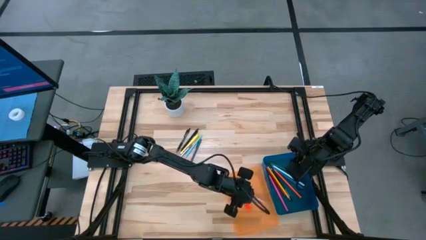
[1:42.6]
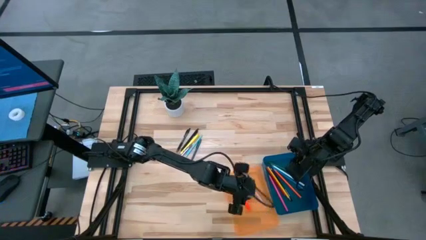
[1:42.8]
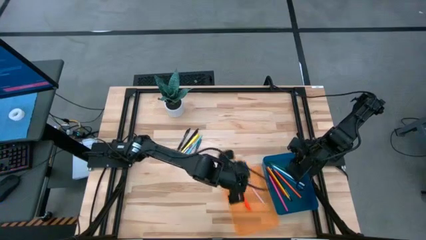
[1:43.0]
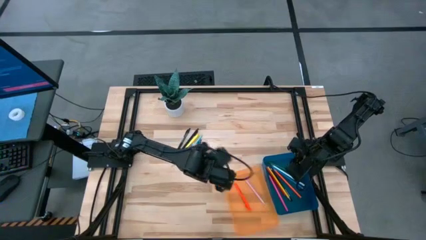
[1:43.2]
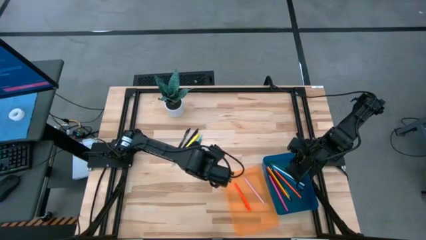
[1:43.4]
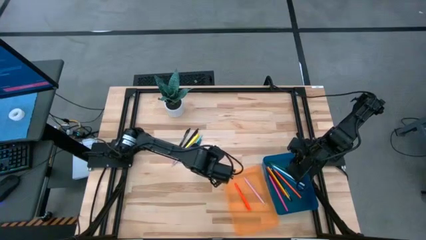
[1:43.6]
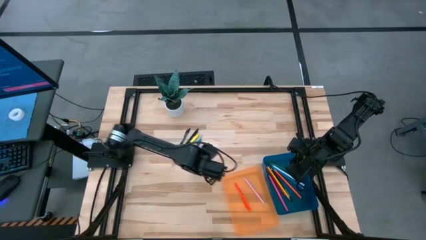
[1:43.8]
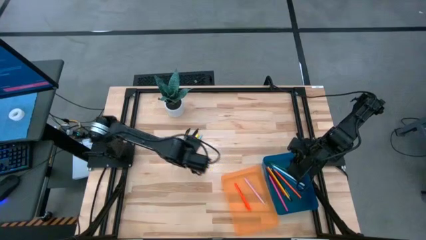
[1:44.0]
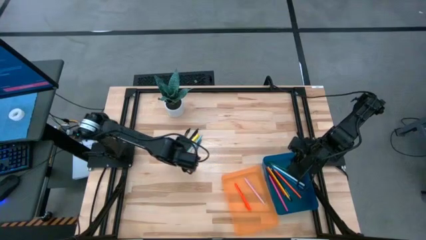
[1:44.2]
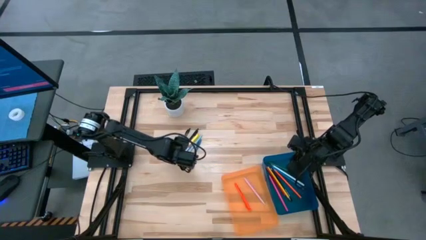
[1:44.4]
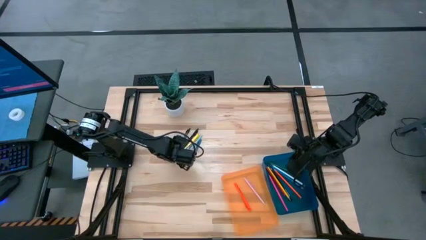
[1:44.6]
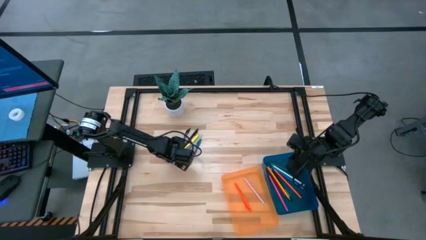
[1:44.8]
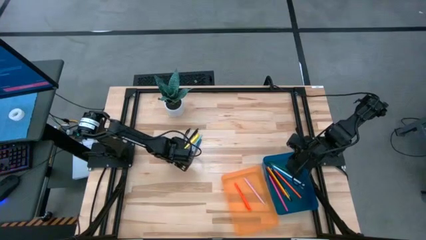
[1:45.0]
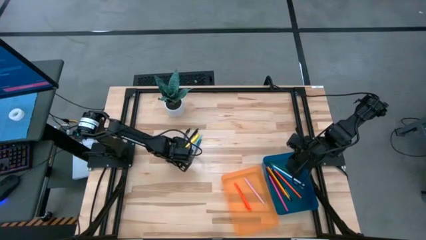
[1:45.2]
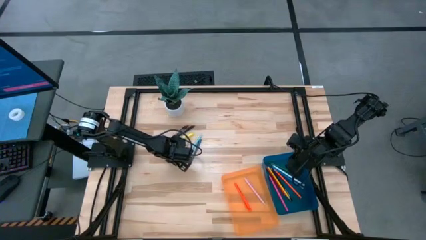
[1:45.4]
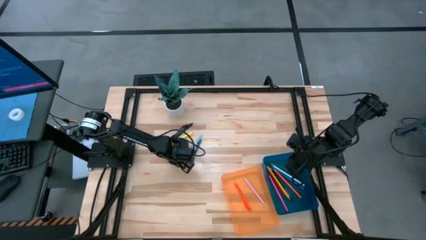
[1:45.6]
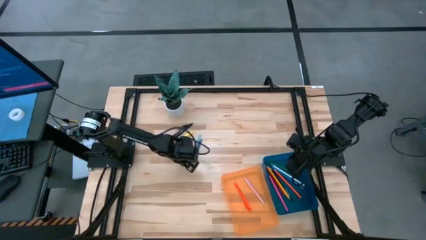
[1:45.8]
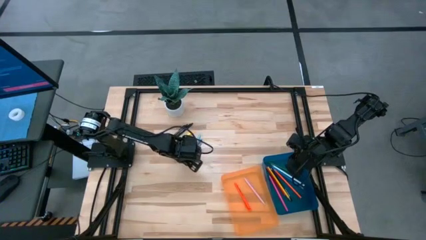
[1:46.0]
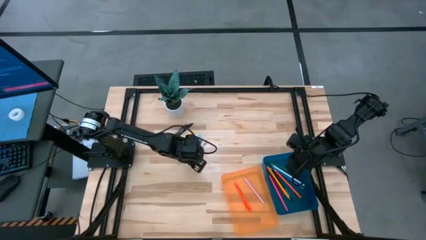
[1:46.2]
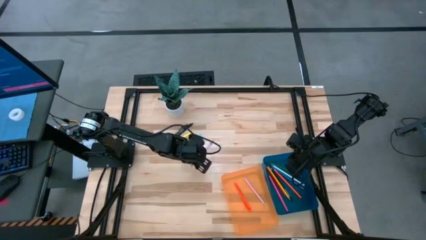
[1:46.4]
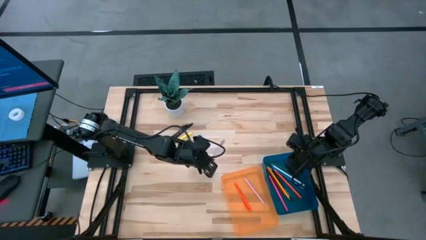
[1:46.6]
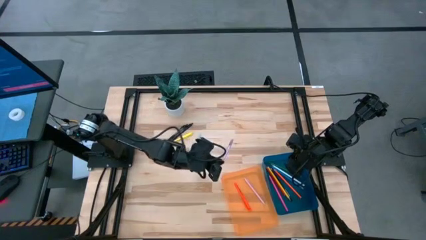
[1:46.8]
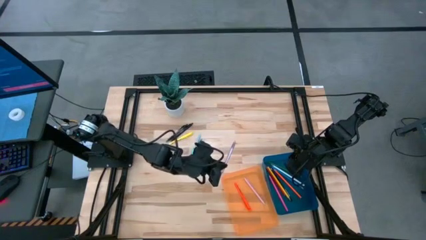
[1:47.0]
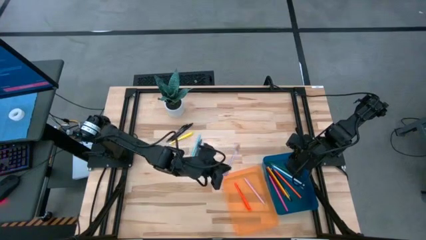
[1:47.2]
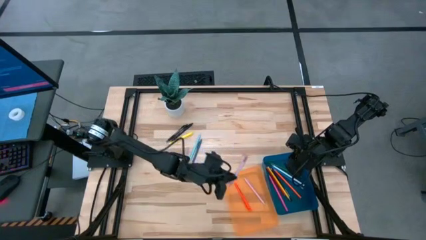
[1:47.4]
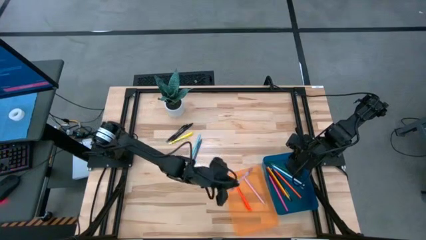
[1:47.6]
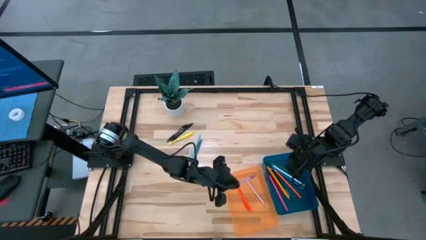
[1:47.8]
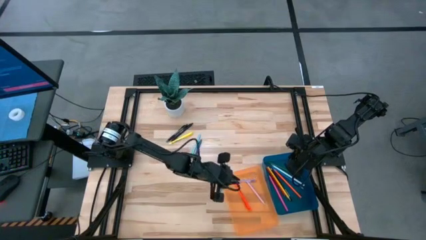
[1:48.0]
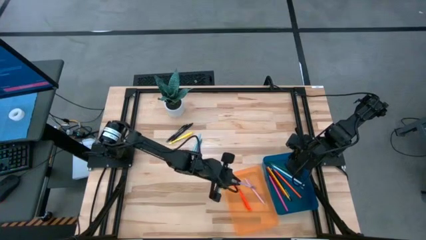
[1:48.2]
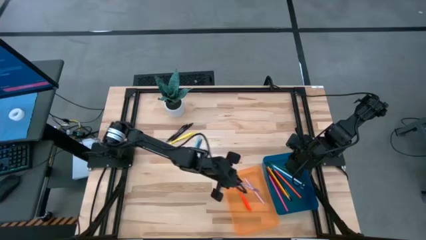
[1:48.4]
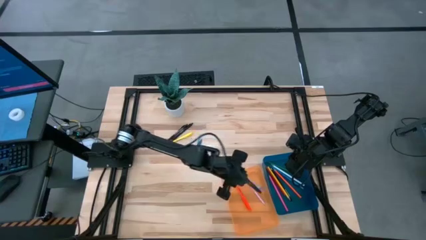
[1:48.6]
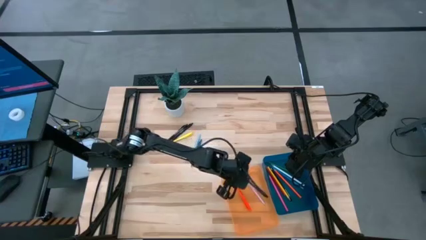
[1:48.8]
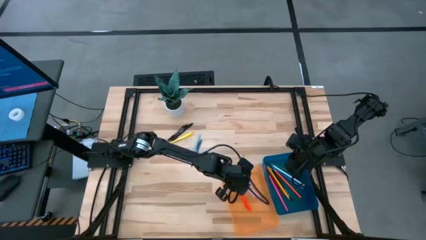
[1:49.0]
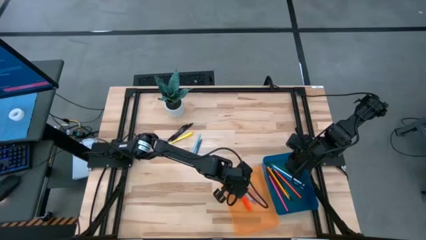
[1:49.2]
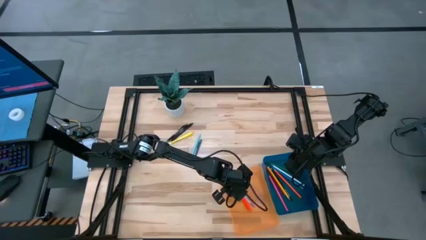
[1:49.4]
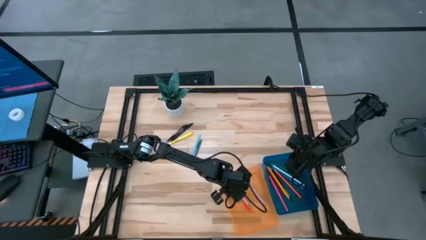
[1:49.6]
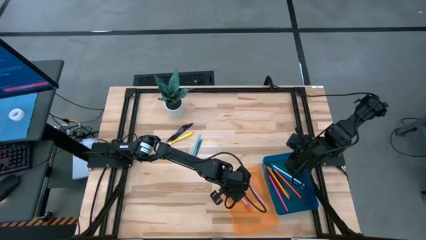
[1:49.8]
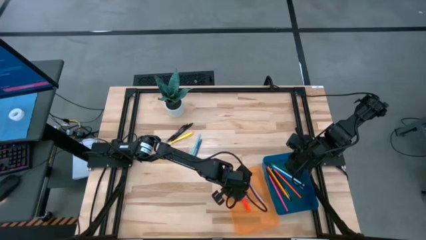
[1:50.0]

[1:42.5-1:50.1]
Task: Sort pens & pencils
Put the purple pen into the orange bin

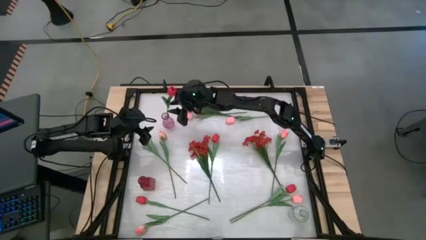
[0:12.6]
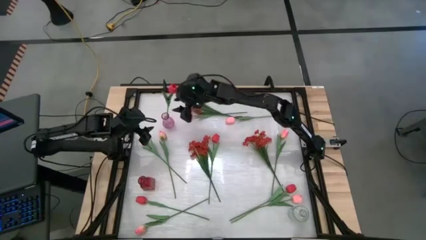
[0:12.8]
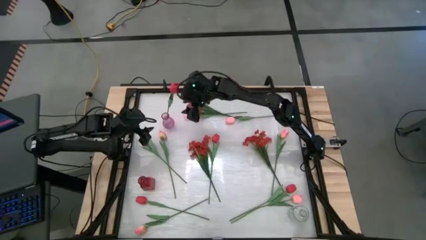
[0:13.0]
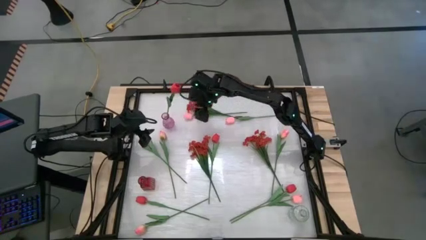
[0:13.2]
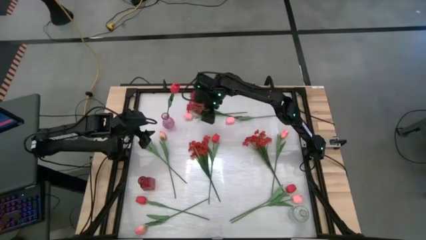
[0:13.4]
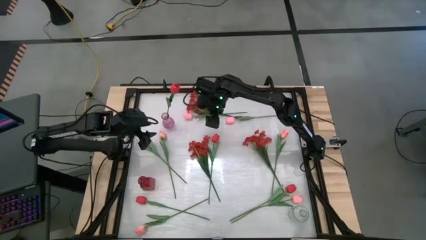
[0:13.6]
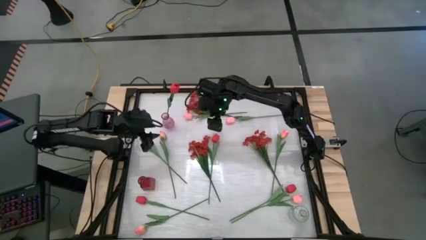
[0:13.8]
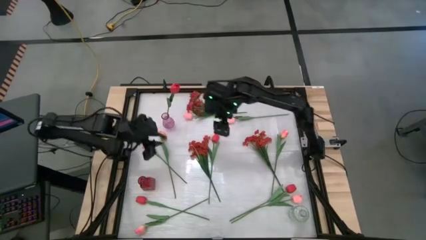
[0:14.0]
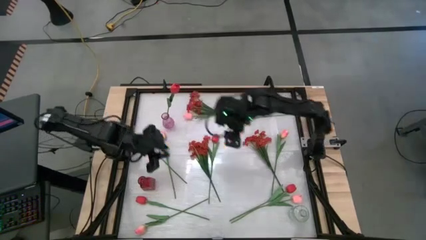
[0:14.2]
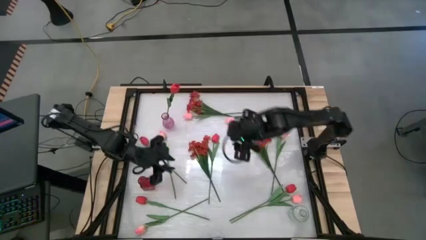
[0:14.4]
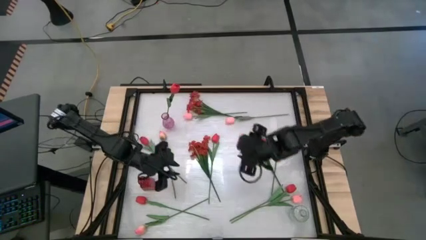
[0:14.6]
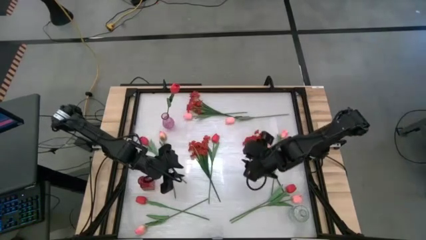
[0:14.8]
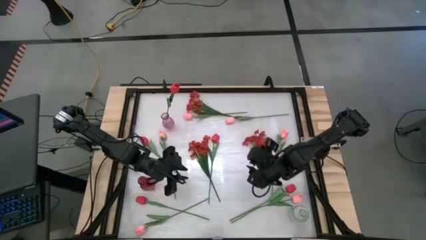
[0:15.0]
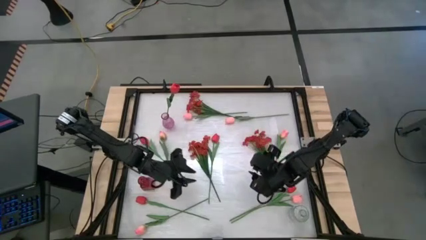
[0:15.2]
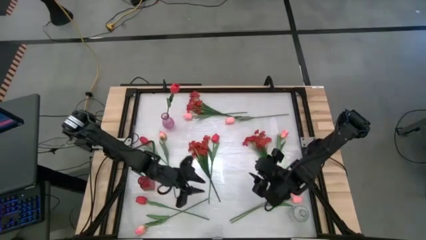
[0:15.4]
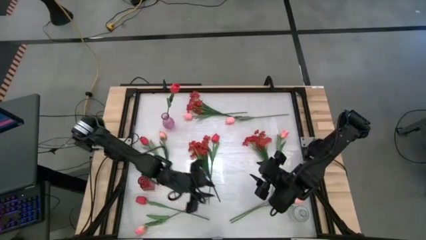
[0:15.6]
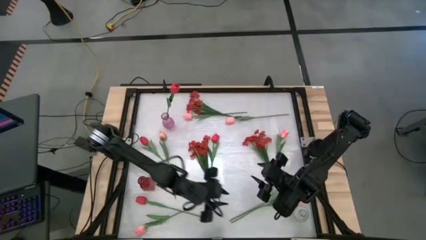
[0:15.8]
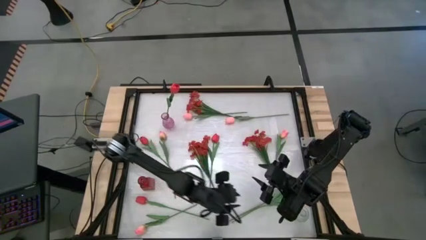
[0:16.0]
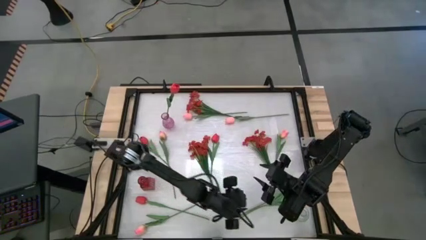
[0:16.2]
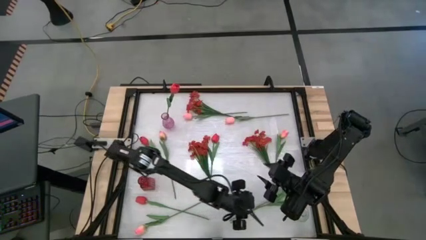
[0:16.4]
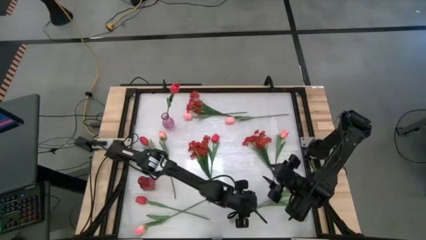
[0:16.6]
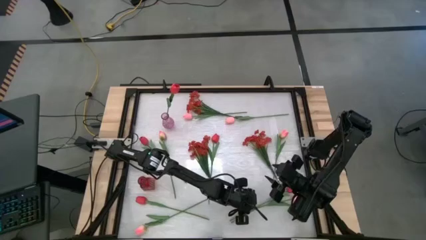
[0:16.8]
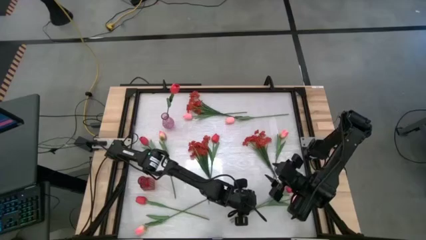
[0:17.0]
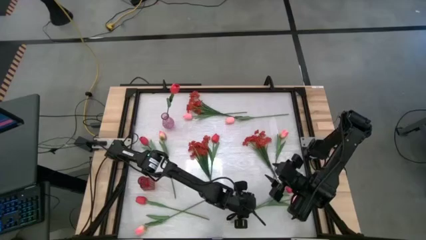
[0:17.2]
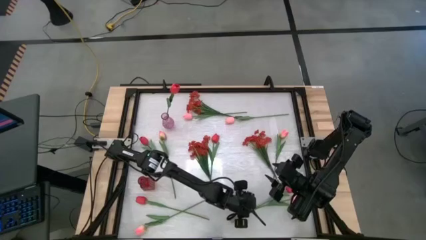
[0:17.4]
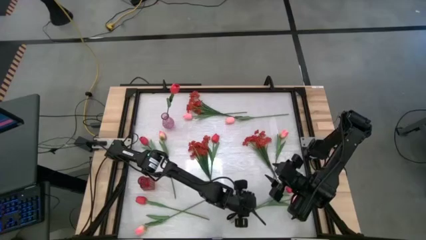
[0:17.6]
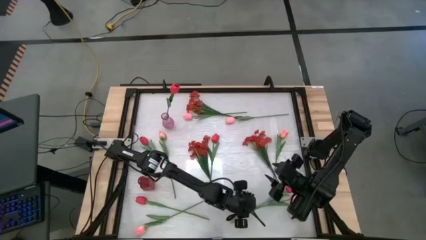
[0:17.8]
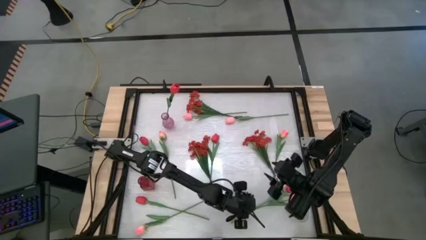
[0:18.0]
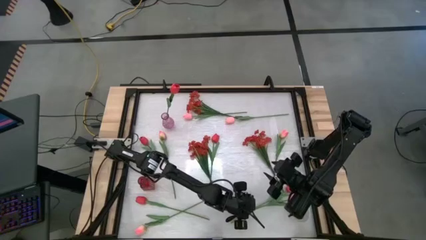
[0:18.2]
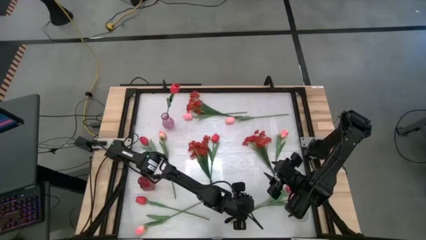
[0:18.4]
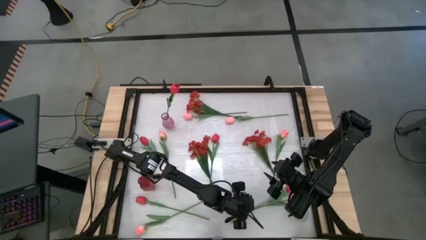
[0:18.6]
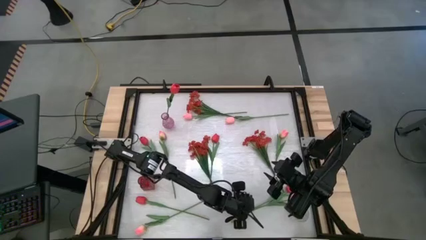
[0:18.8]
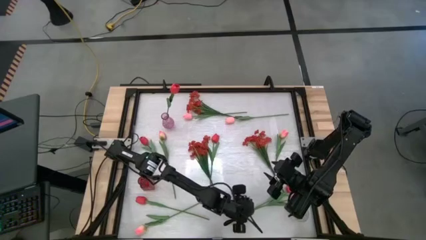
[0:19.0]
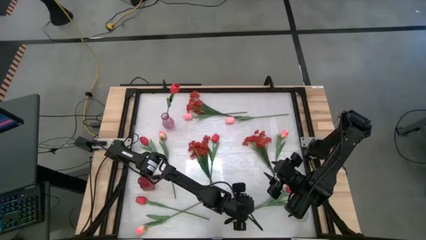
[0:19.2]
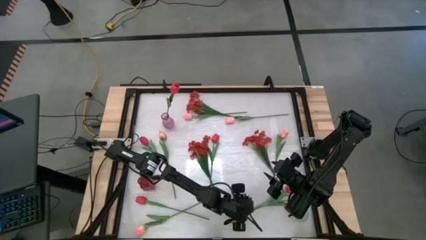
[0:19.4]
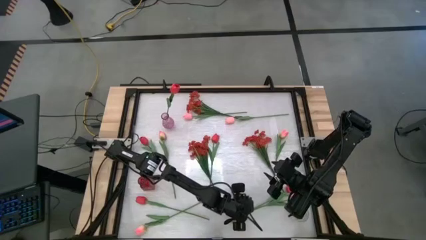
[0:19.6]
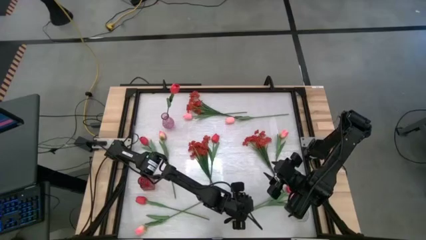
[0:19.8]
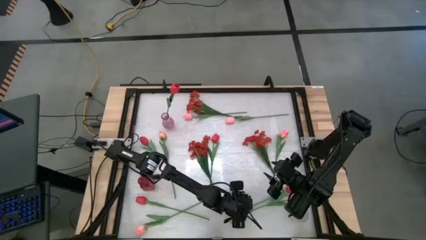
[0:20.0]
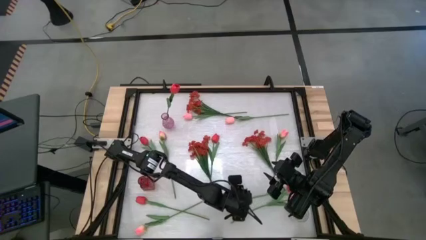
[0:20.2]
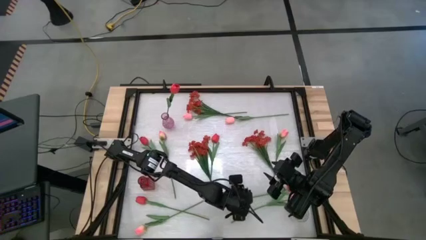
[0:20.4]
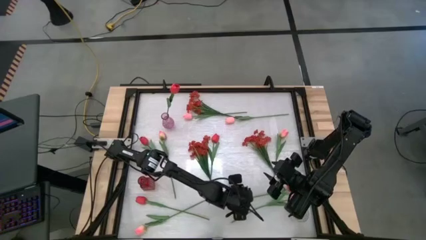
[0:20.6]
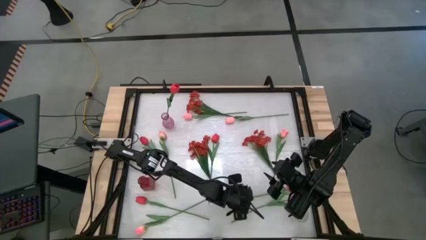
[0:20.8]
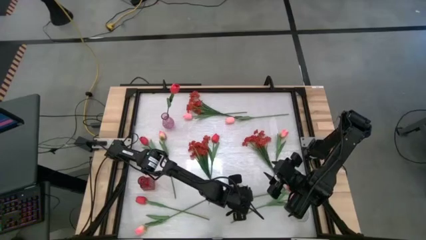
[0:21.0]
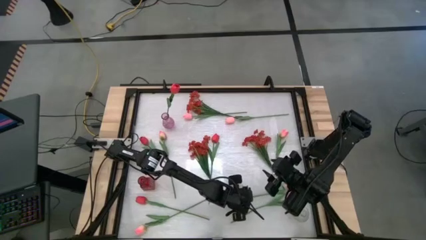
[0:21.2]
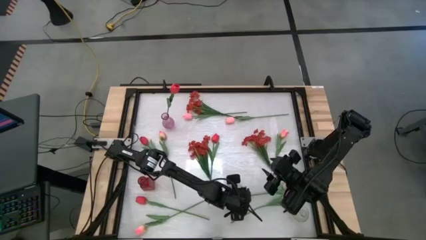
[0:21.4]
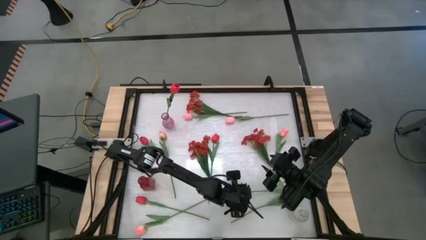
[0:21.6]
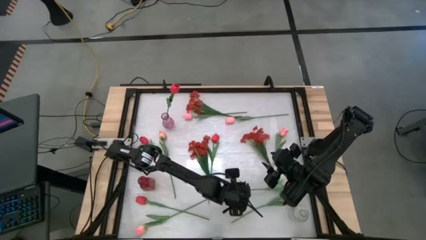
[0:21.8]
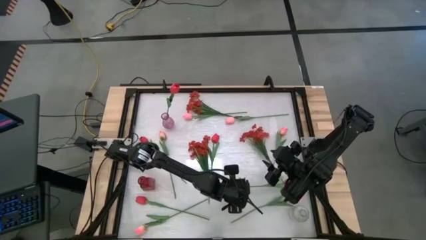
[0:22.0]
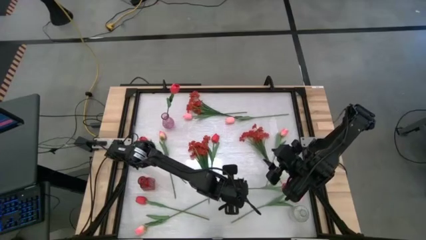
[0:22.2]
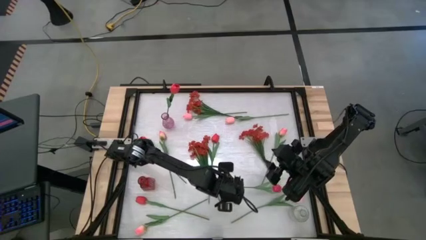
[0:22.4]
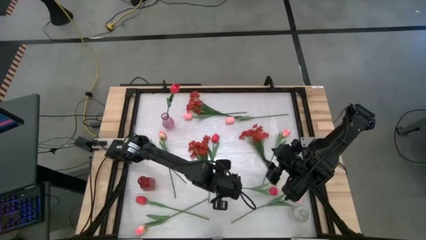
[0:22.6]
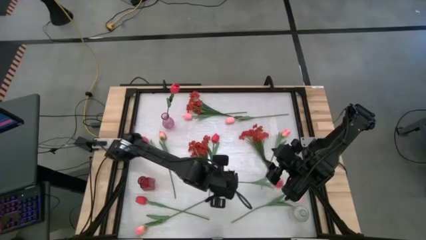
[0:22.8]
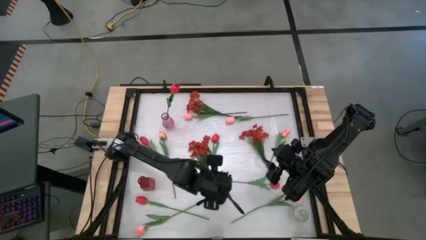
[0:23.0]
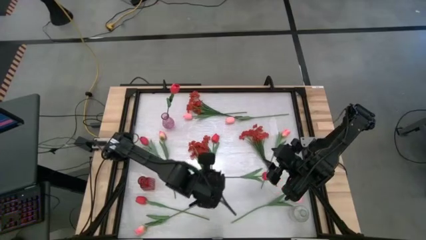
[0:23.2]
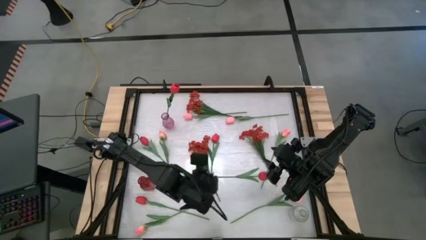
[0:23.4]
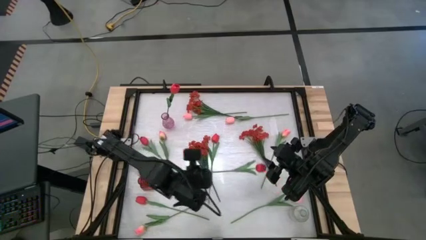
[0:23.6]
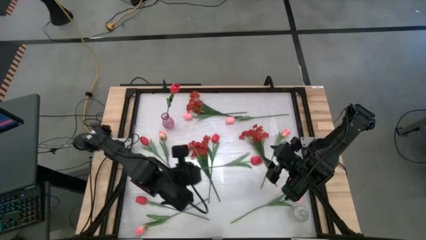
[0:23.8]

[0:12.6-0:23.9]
Task: Sort flowers into vase by color
Put the red tulip into the purple vase
